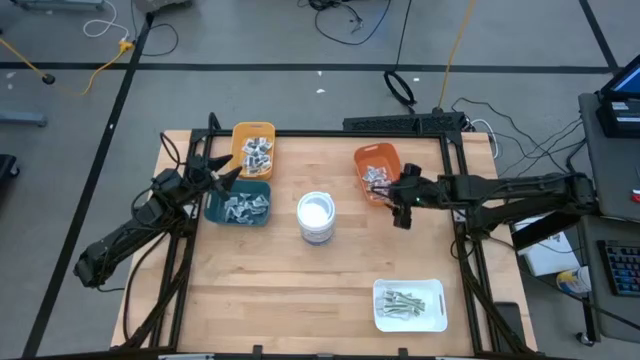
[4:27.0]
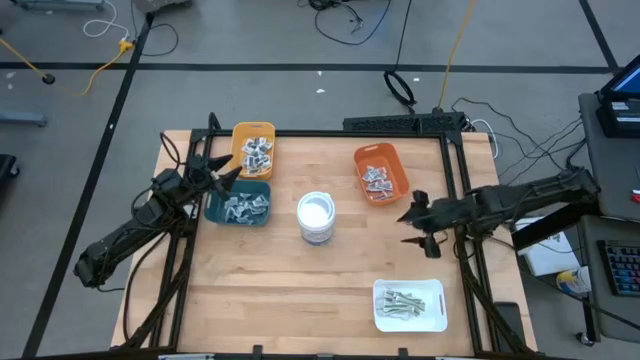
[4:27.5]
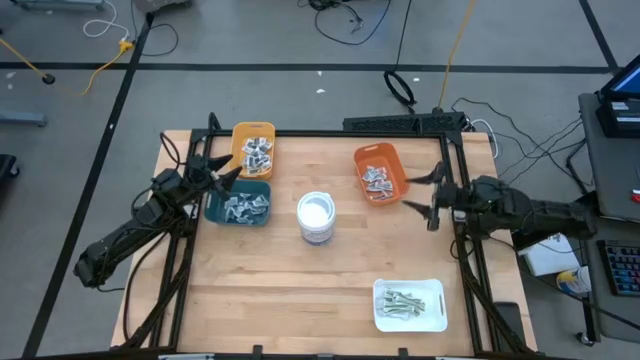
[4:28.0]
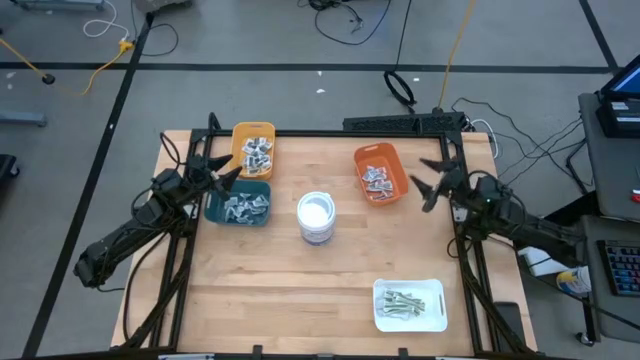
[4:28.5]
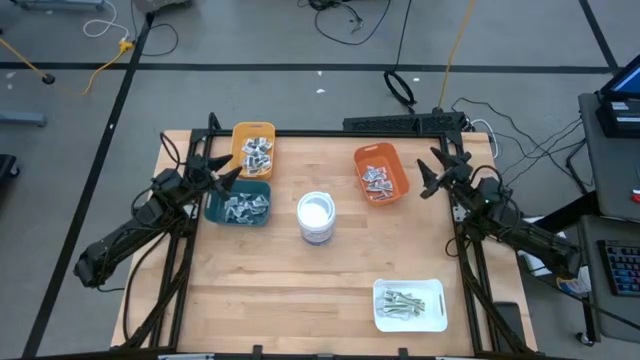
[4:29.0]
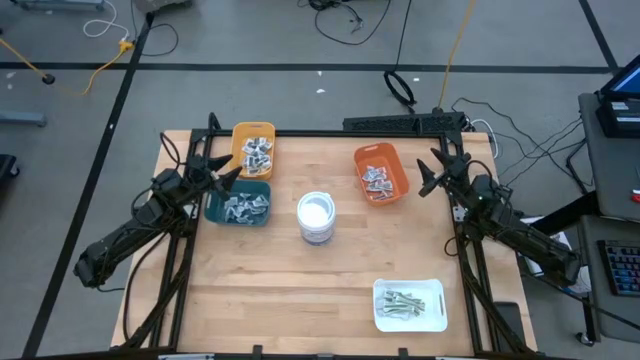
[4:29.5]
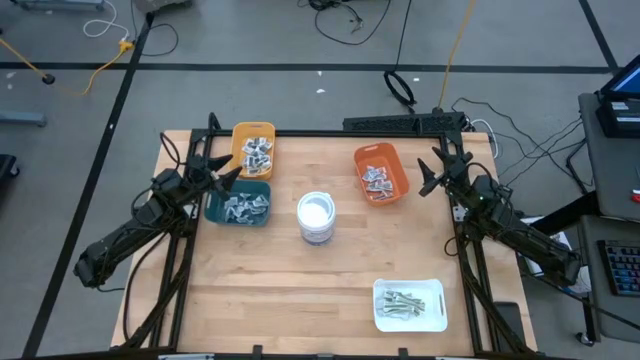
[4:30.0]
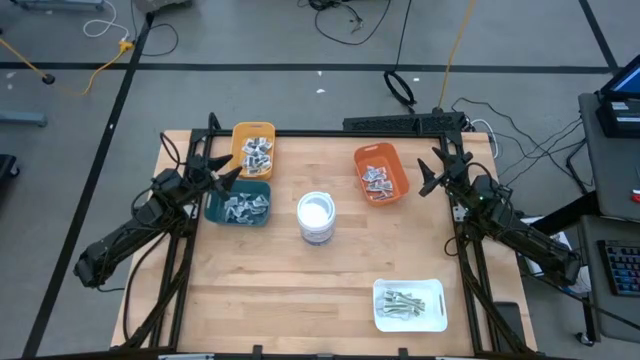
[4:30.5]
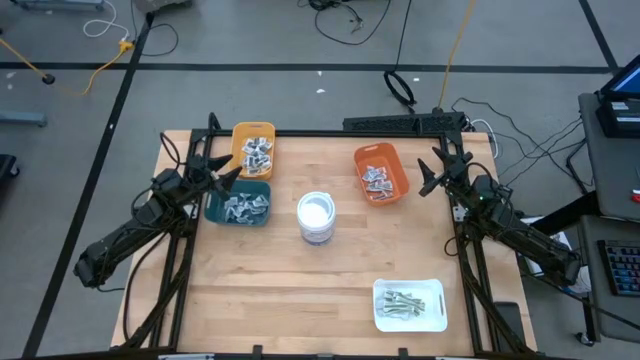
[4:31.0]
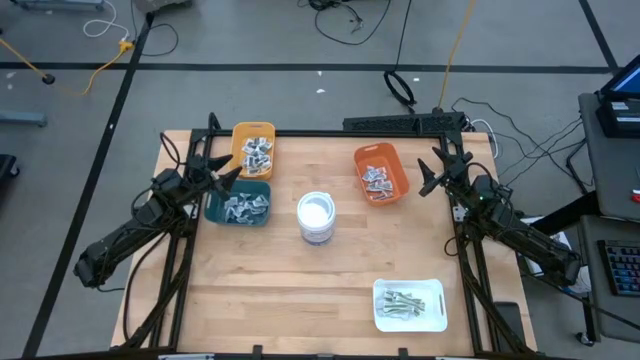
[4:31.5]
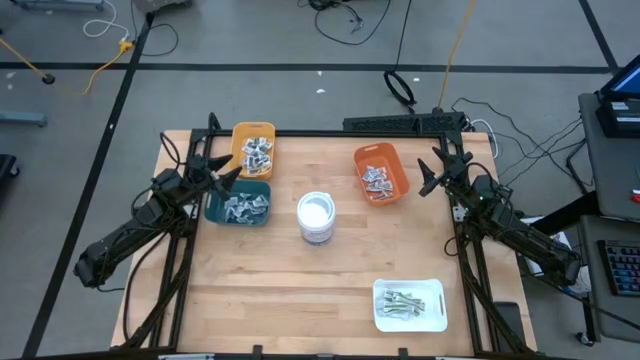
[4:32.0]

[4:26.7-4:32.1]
Task: Pick & Place First Aid Supplies
Return to Home Position

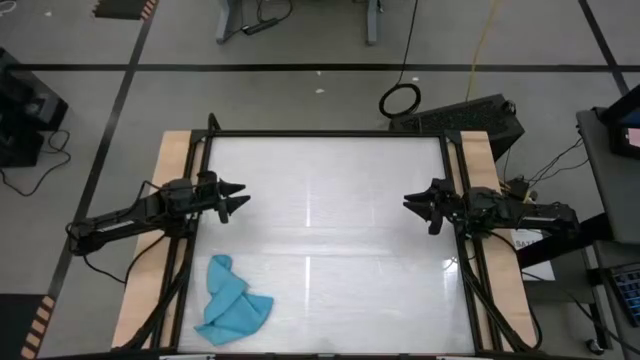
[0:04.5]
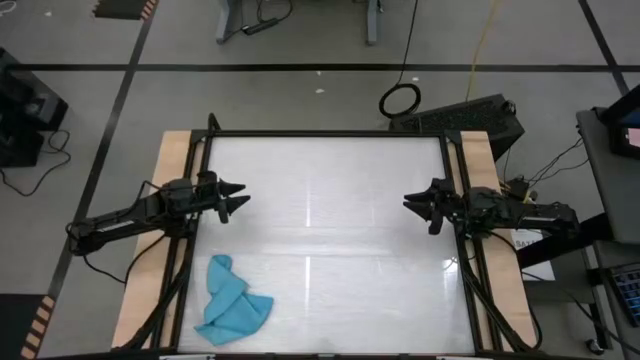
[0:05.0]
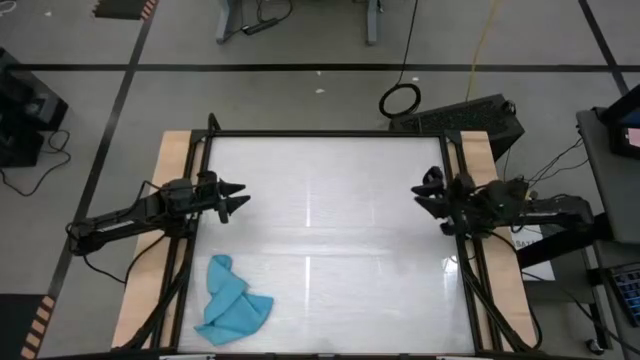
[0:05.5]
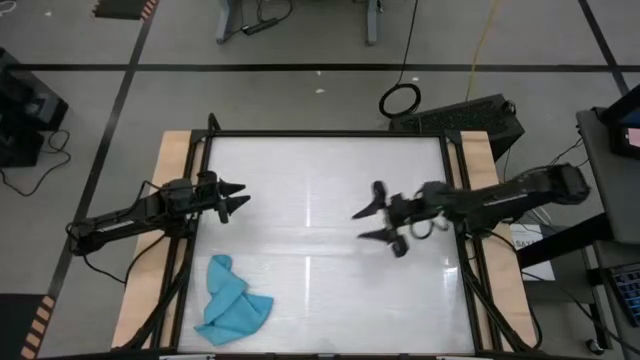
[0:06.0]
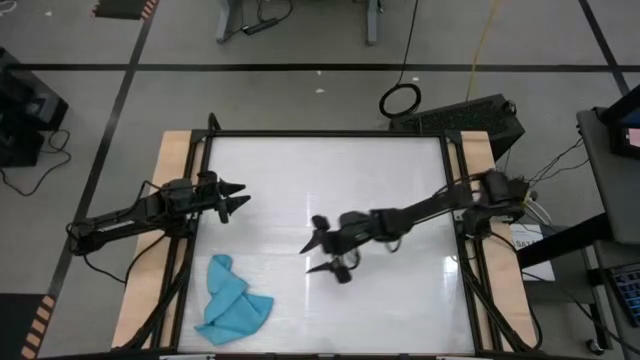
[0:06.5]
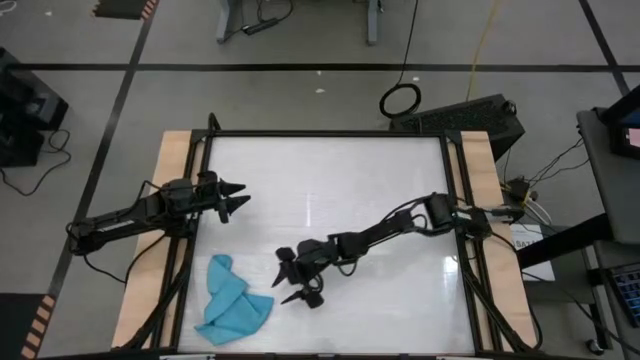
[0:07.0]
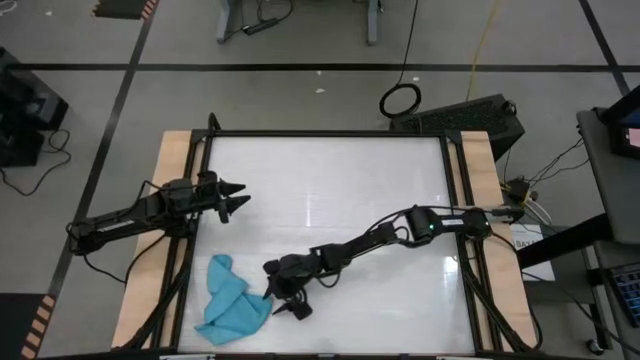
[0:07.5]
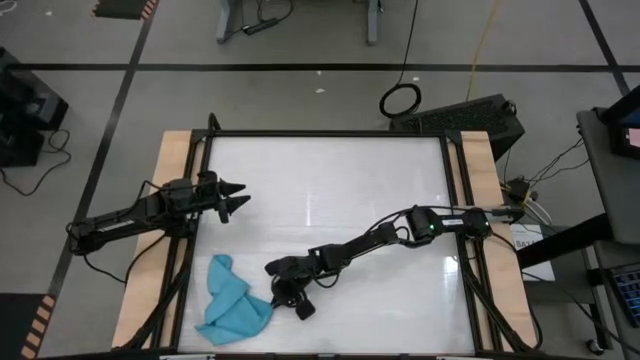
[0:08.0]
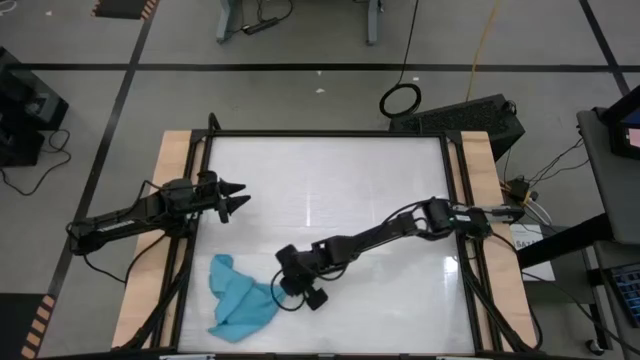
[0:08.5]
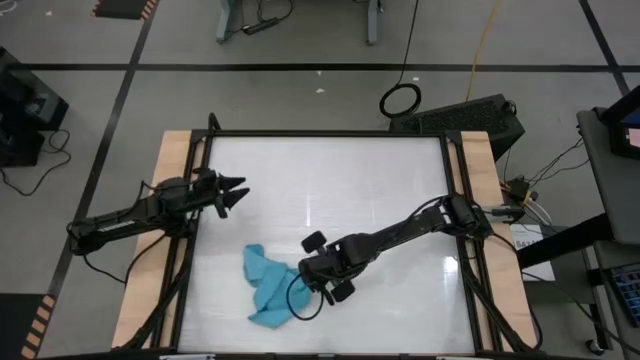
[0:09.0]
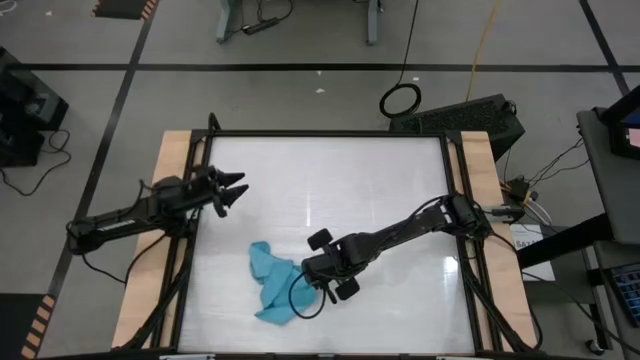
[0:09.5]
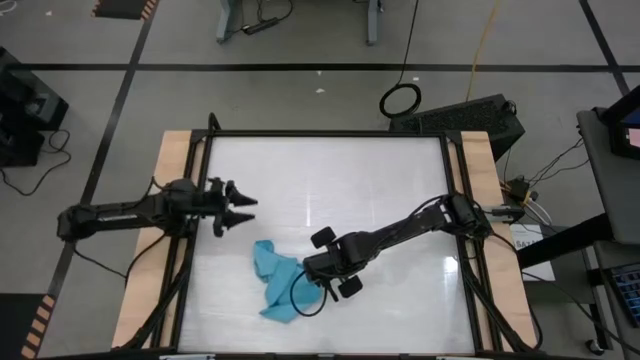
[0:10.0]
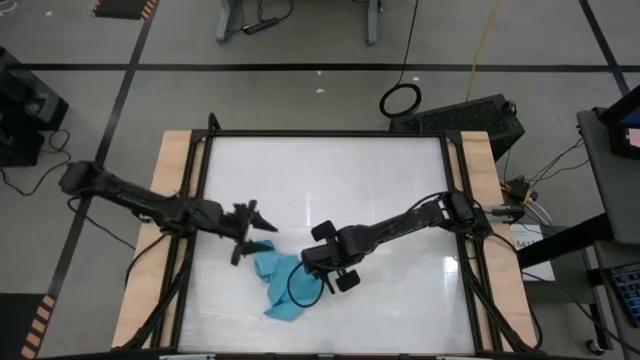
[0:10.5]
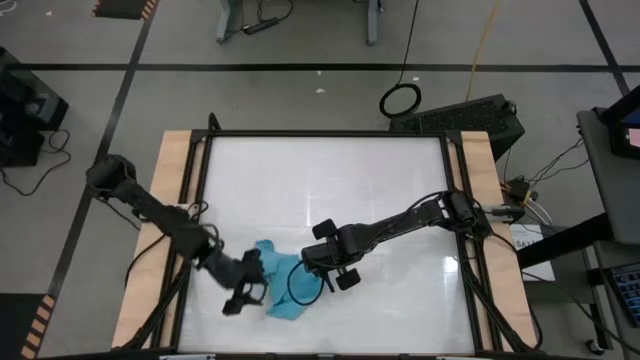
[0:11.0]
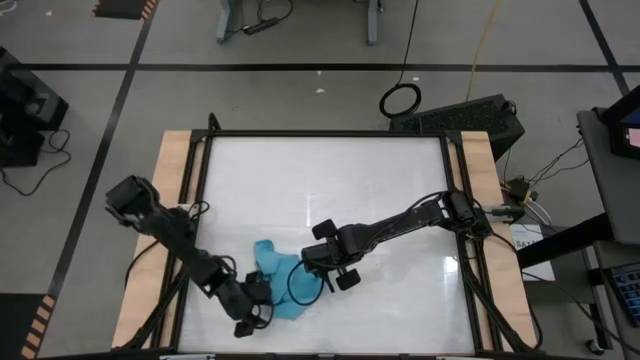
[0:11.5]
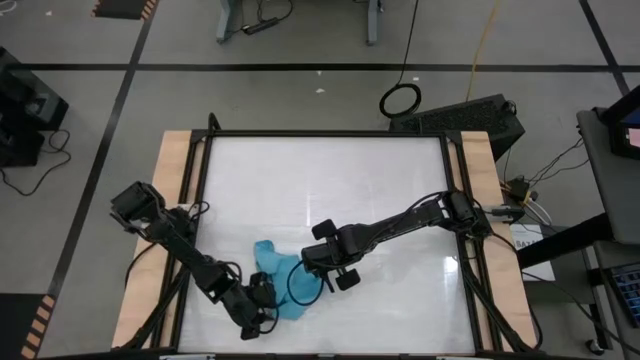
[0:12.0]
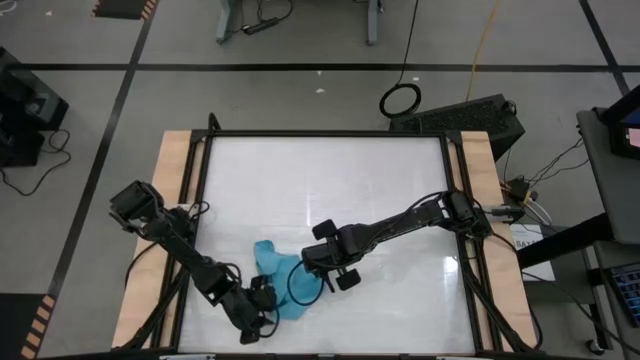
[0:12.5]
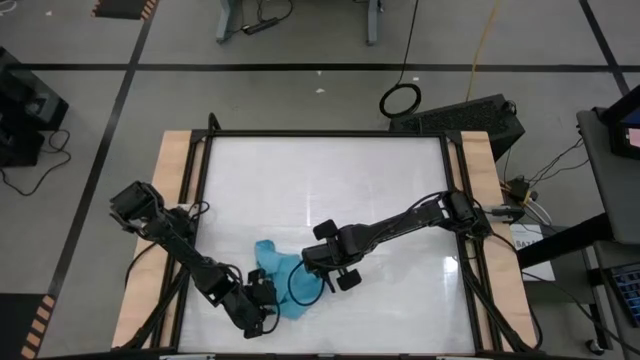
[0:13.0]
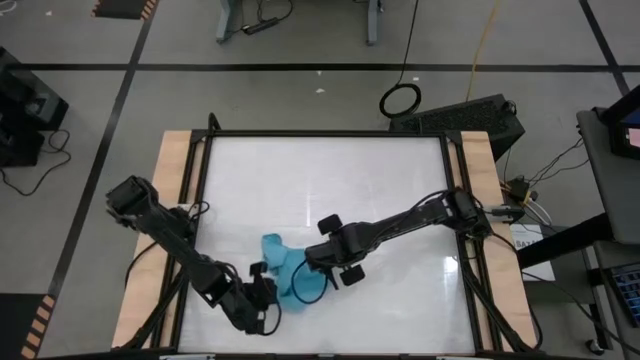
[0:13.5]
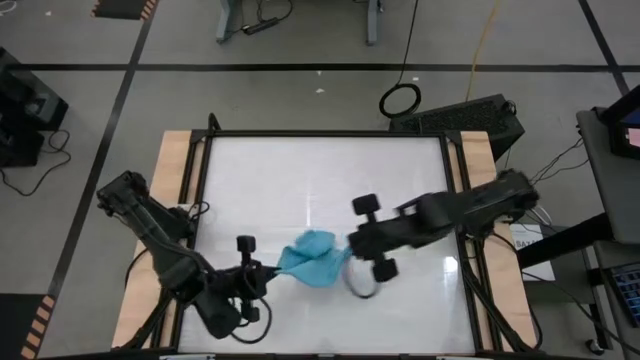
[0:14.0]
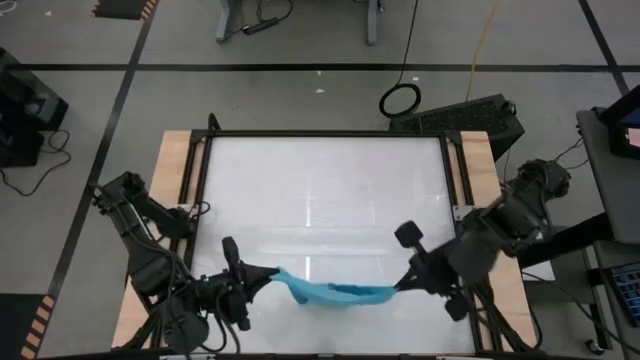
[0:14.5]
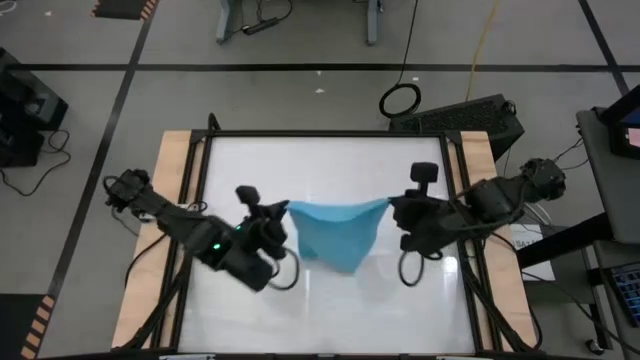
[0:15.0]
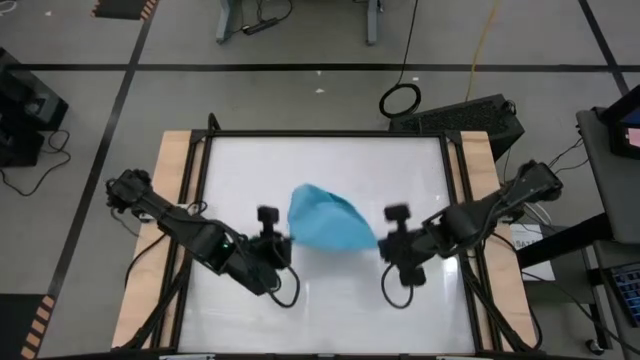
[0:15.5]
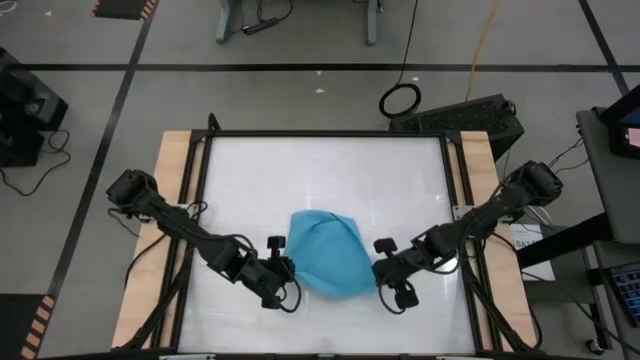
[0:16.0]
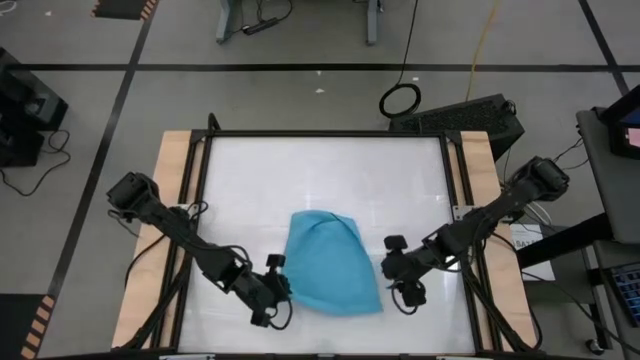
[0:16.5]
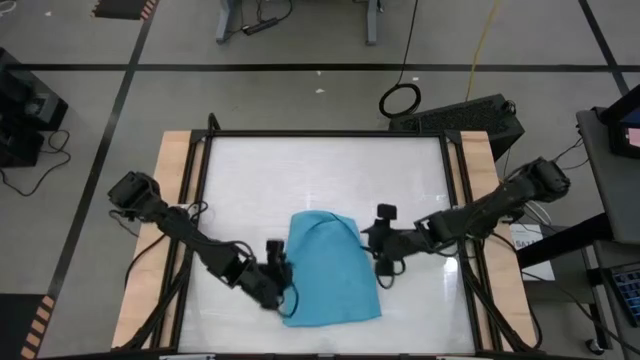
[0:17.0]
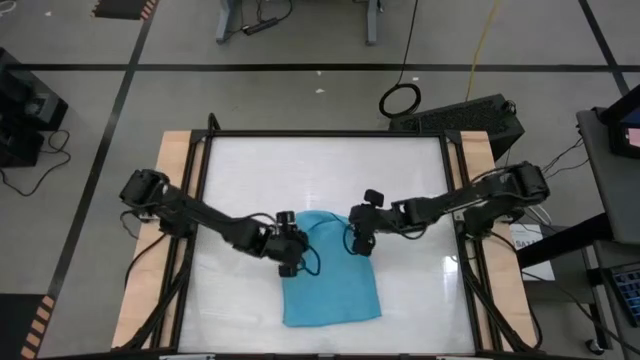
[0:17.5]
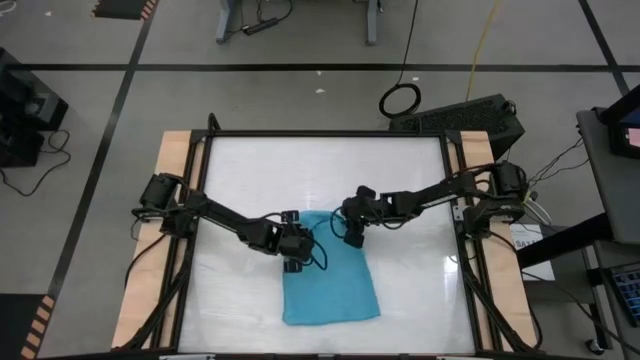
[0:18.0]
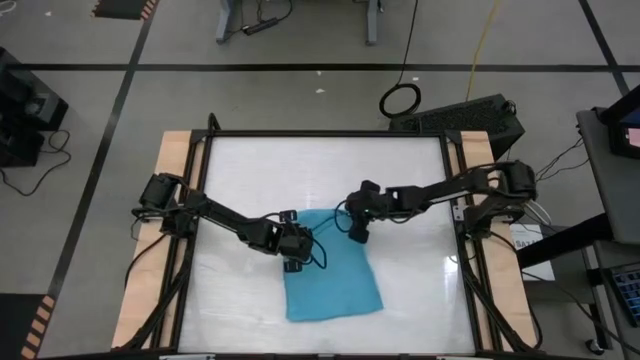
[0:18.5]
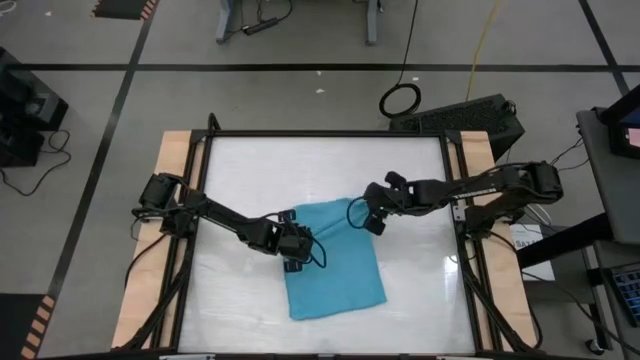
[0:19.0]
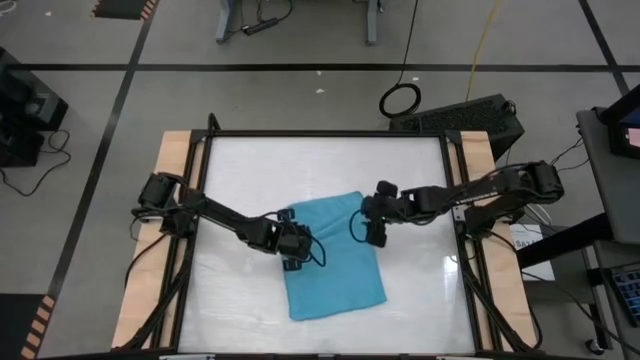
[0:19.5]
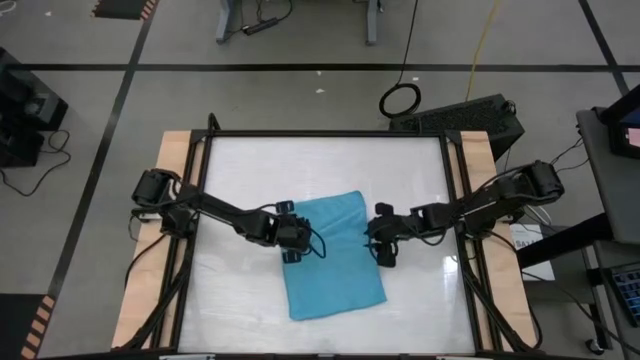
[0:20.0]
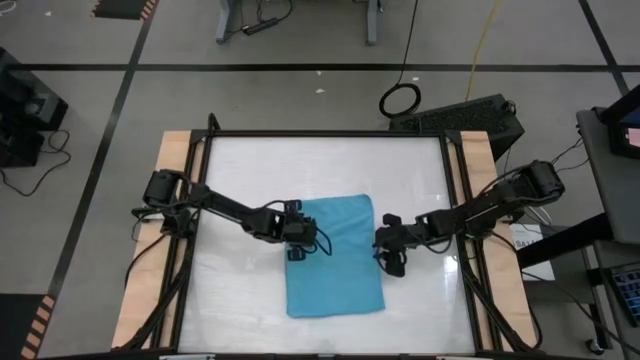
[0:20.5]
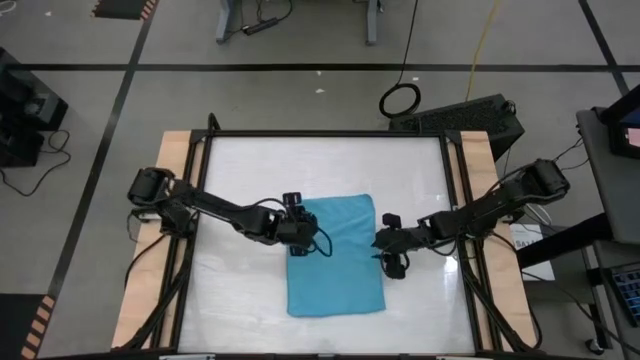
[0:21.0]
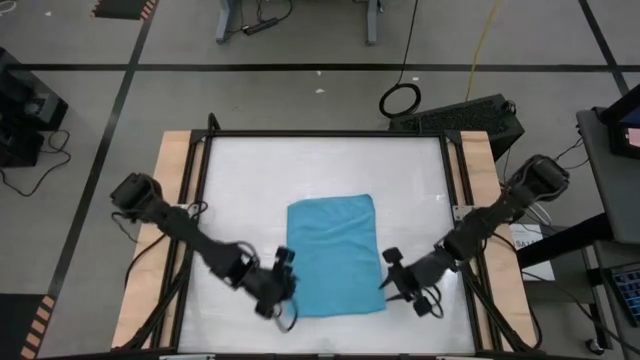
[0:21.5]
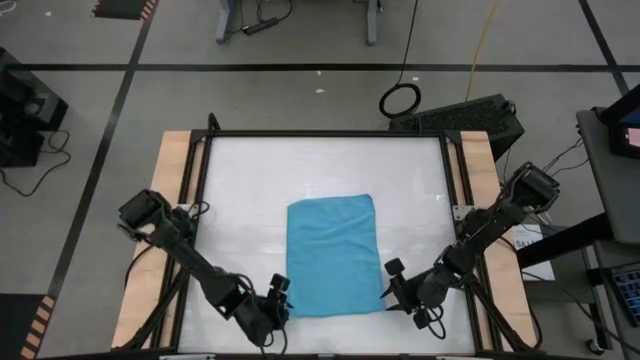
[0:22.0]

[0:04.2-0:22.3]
Task: Roll towel
Fold the blue microfiber towel
